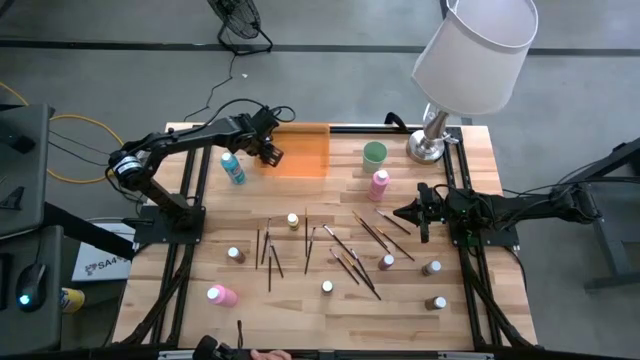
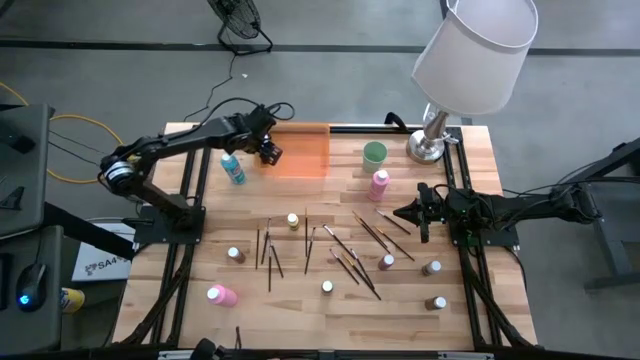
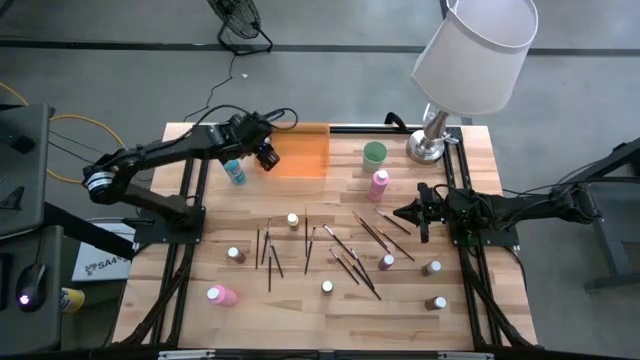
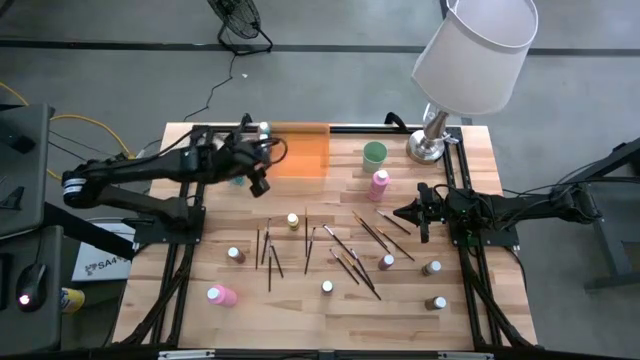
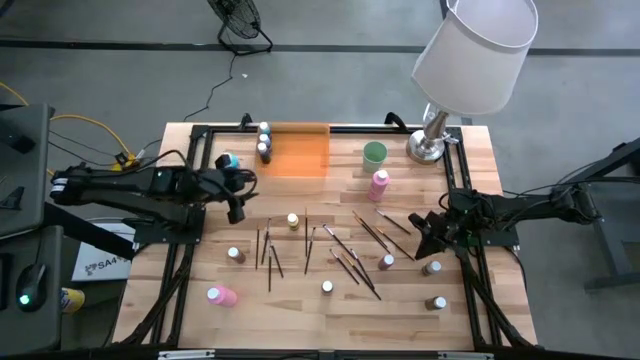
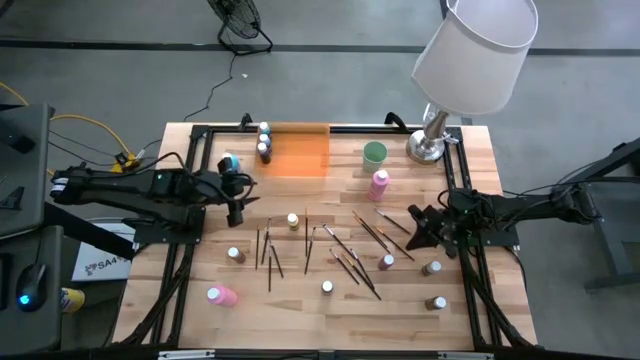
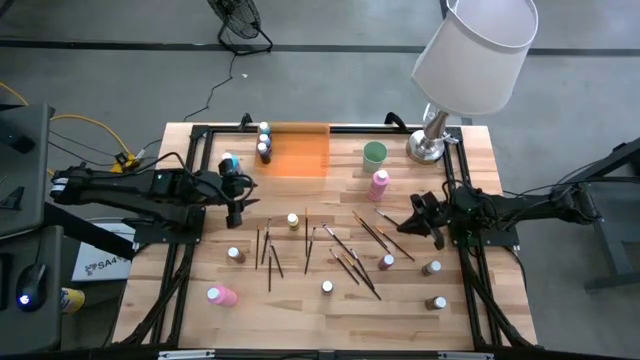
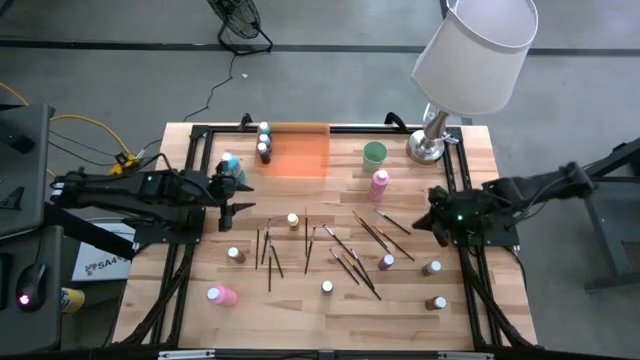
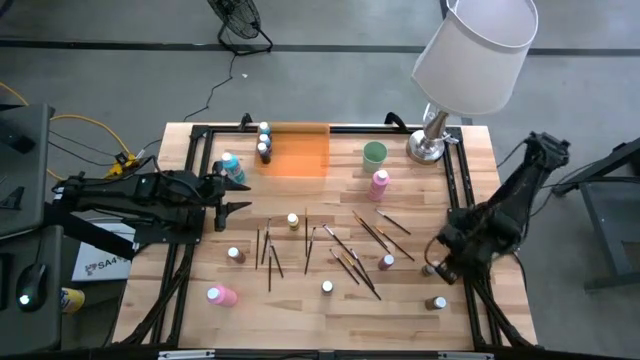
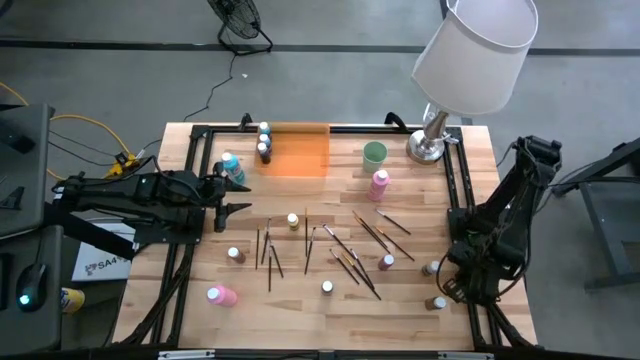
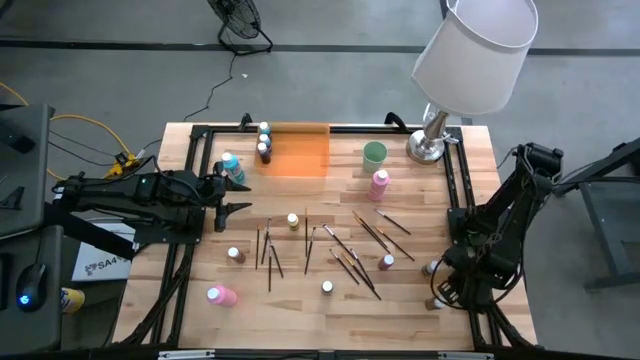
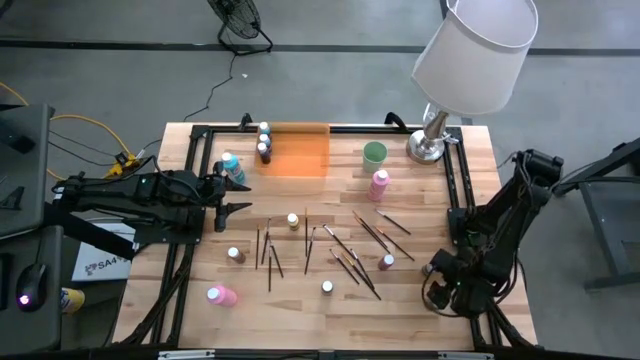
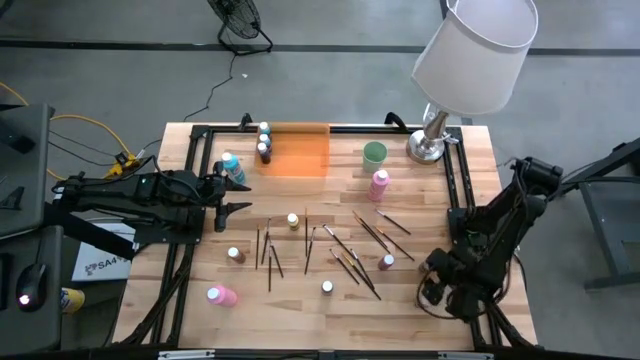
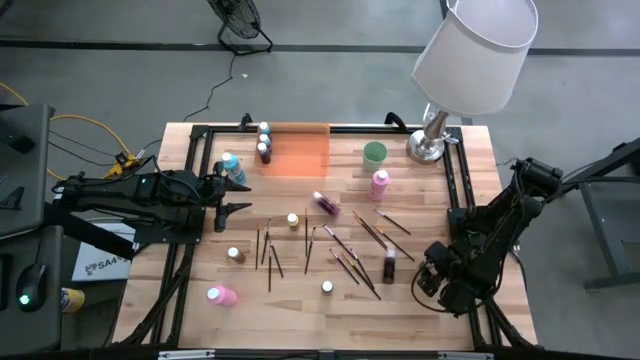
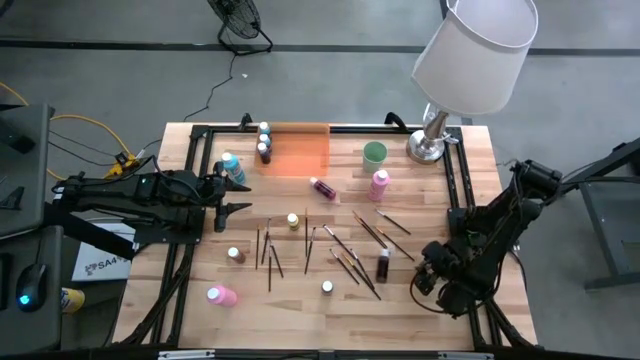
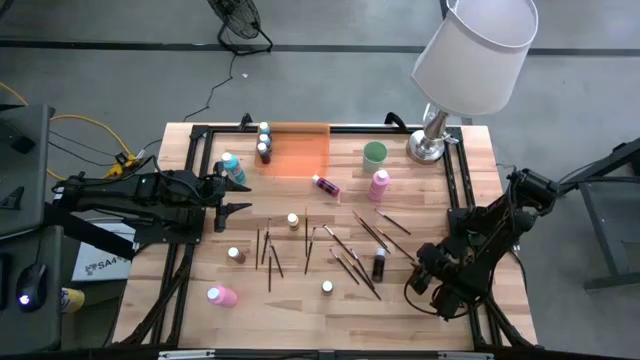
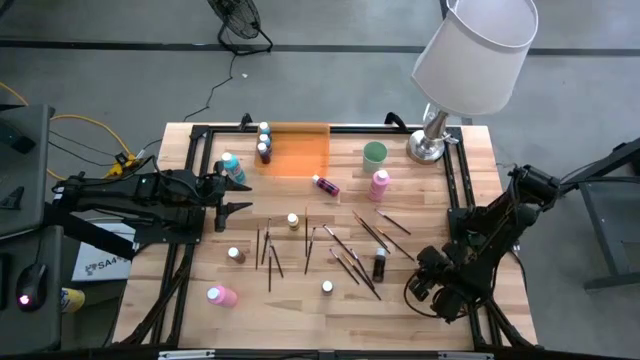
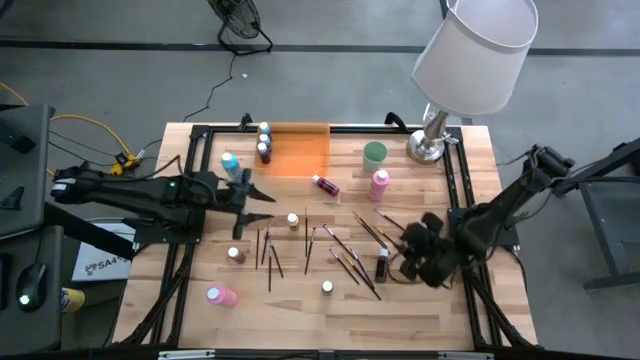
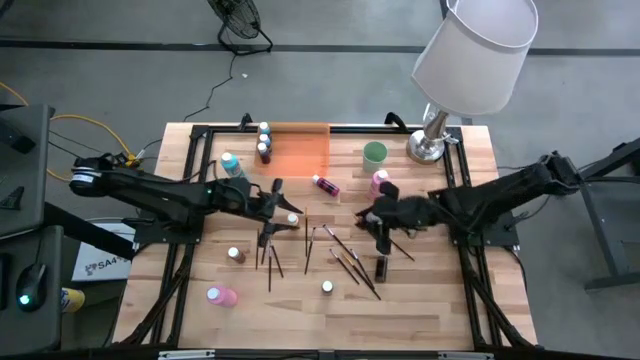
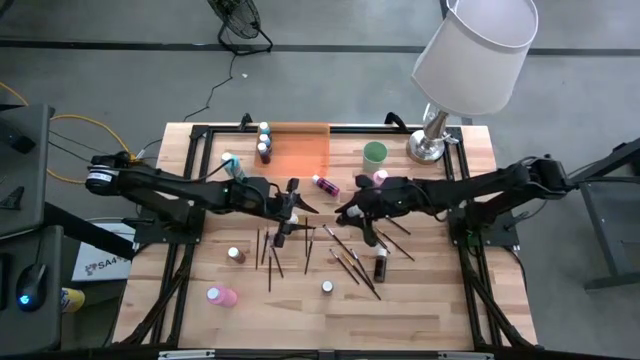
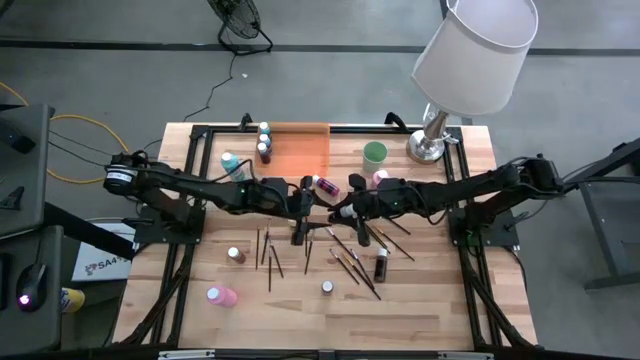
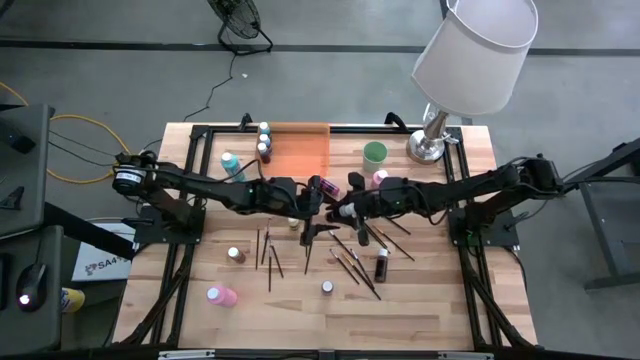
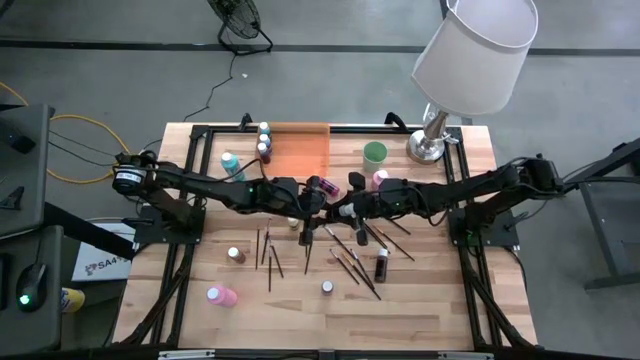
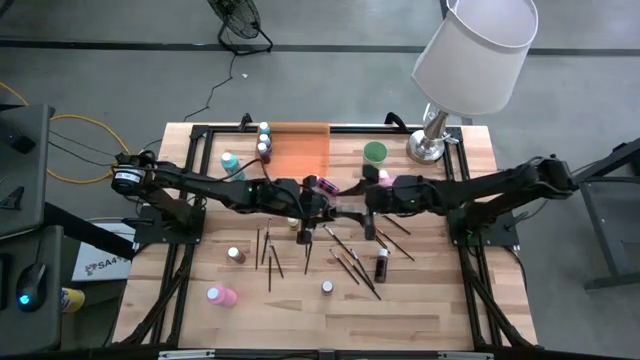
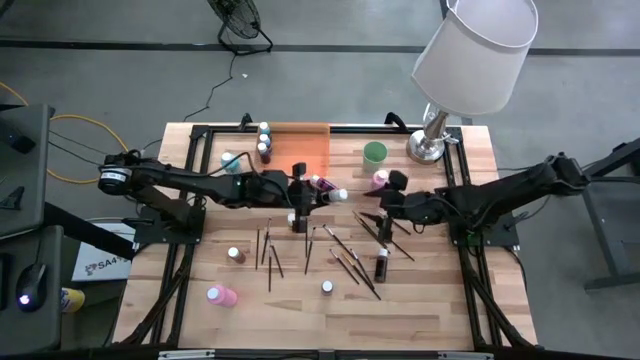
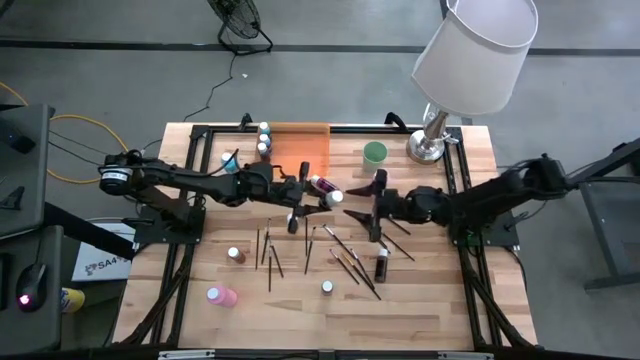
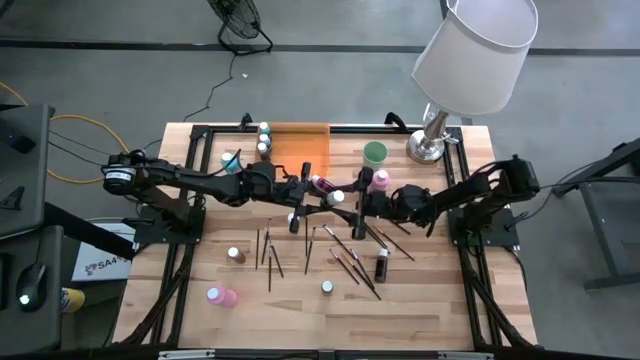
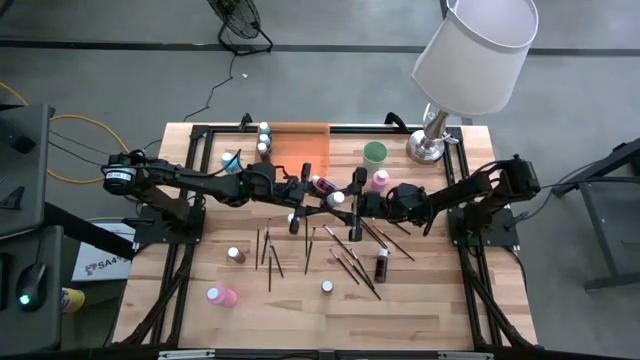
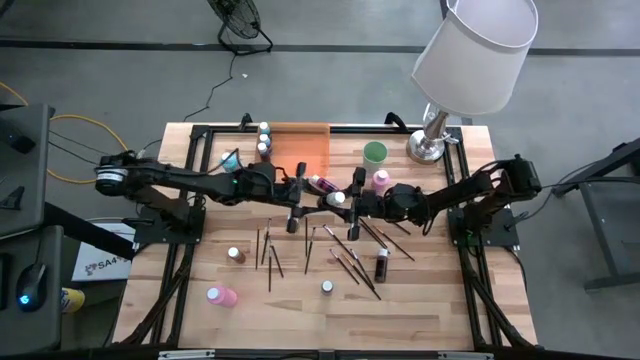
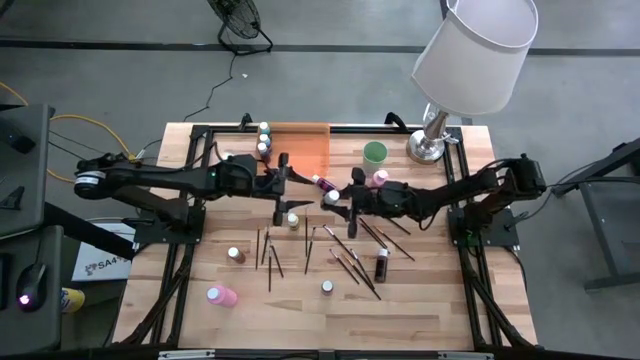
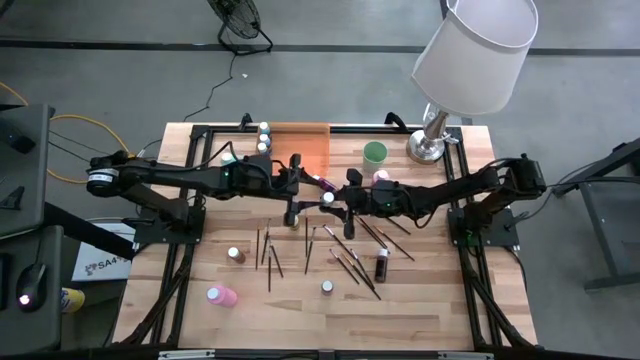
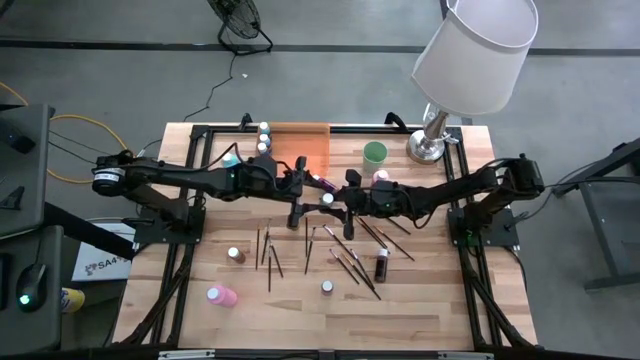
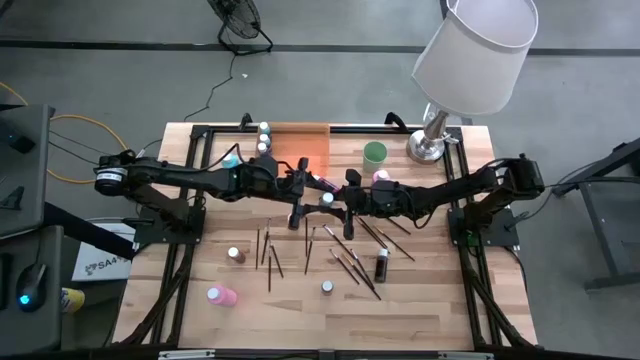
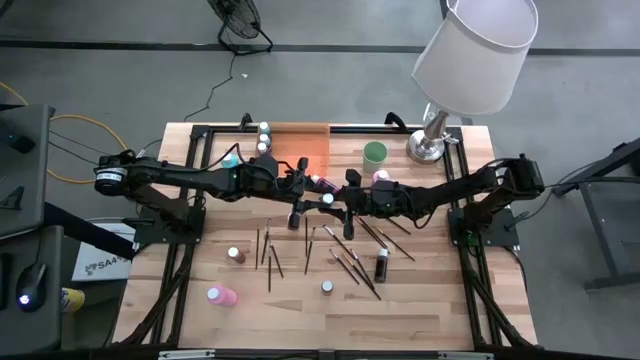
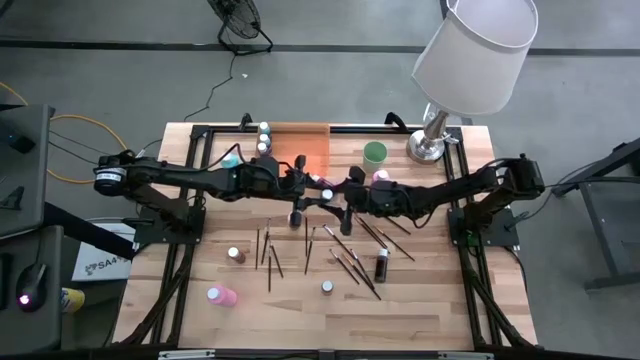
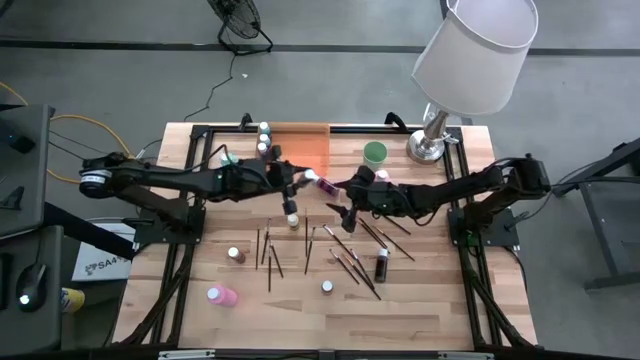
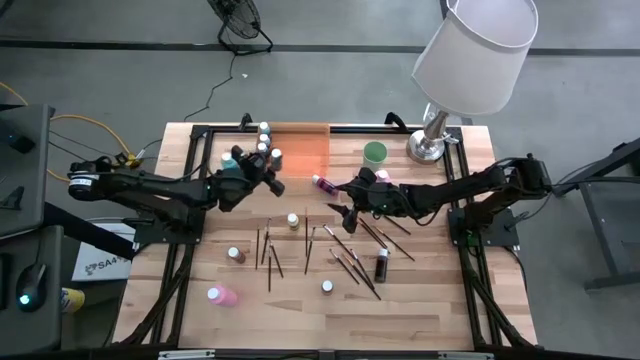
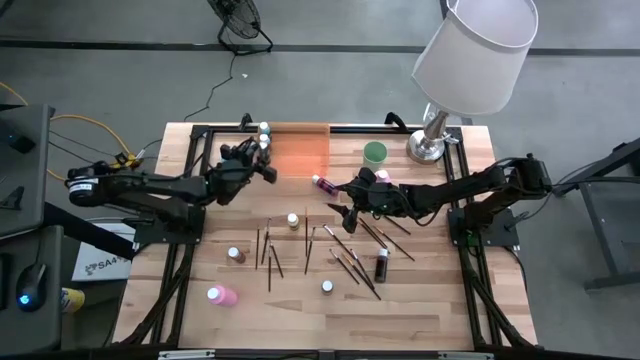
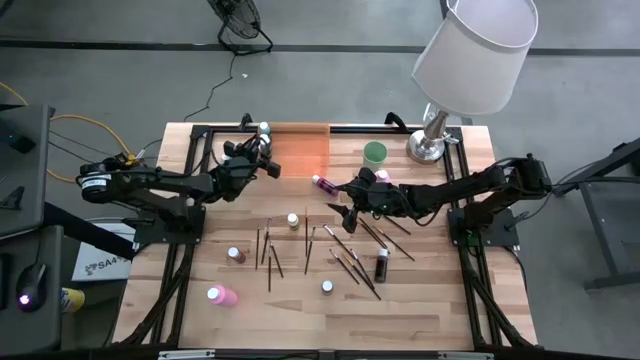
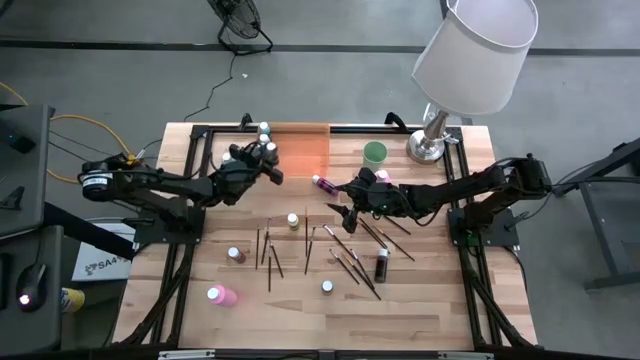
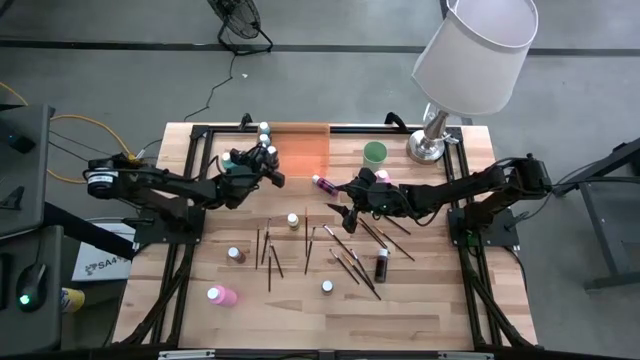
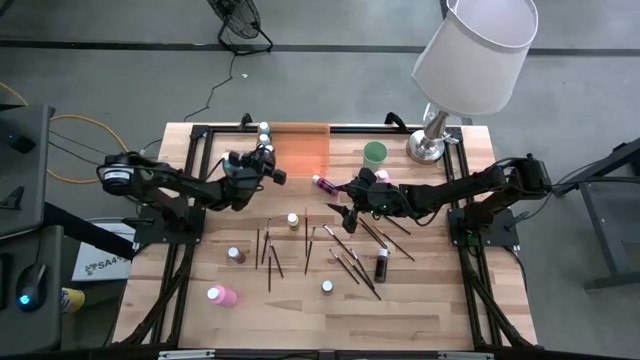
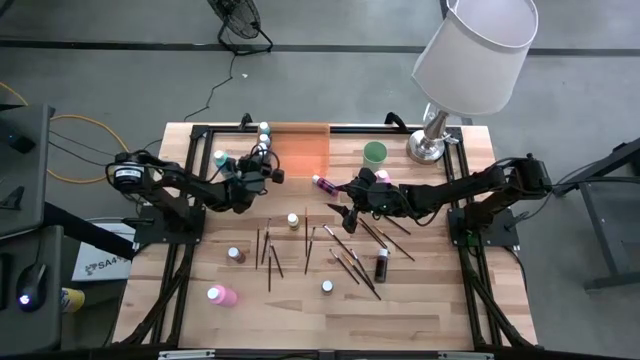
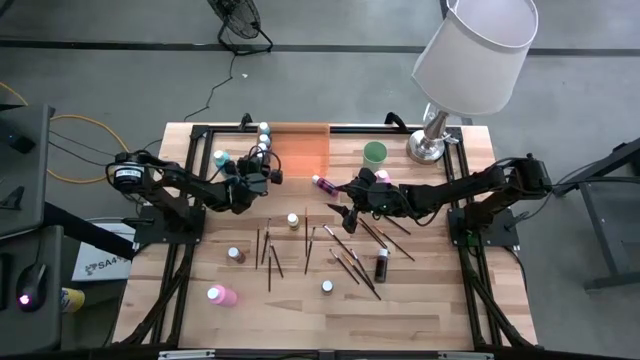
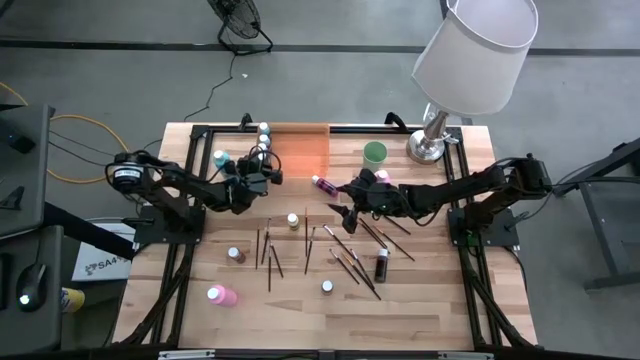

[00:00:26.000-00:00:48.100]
Task: Pick & Place Paint Supplies
Put the gray paint bottle into the orange bin
